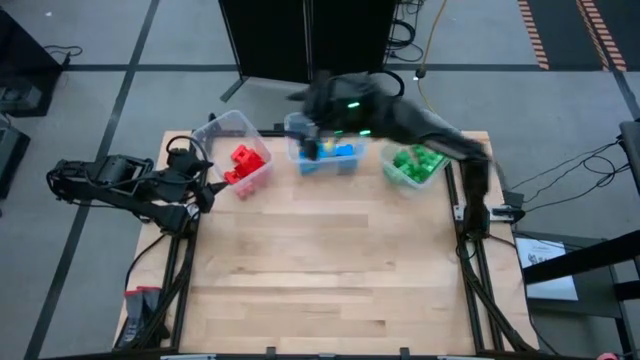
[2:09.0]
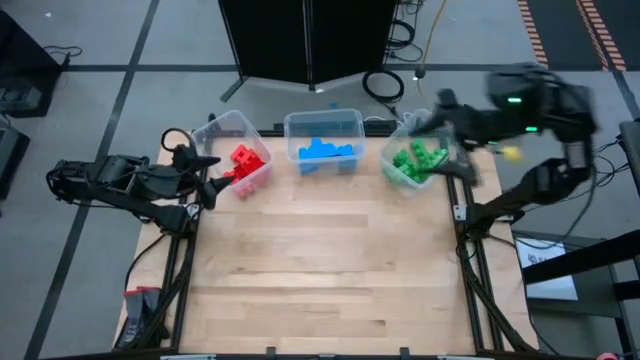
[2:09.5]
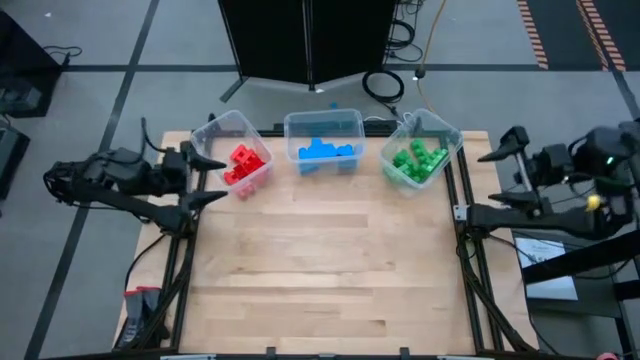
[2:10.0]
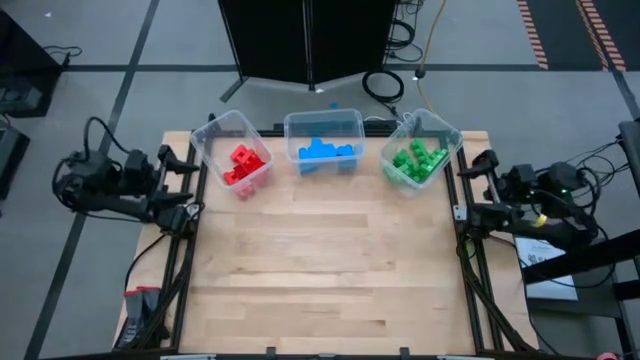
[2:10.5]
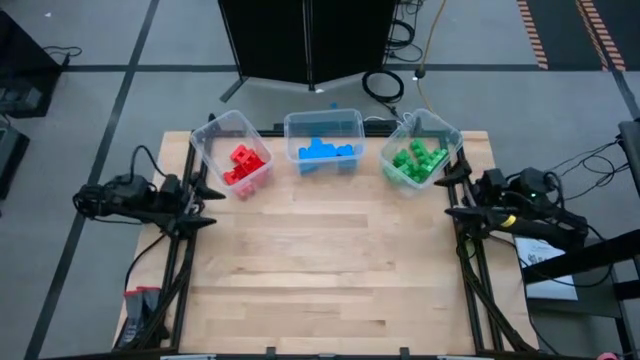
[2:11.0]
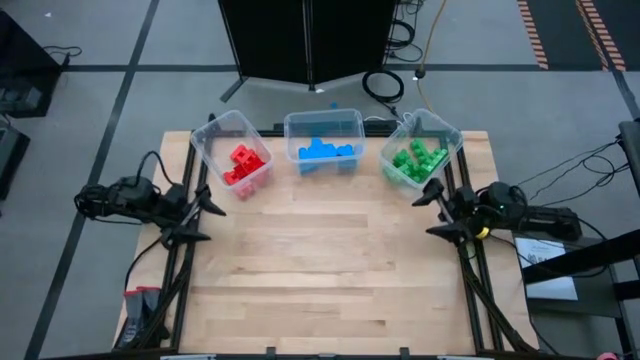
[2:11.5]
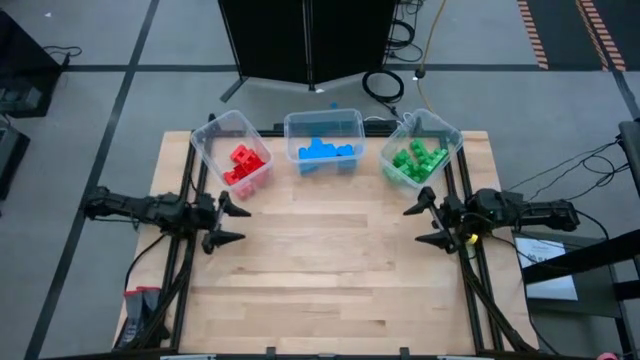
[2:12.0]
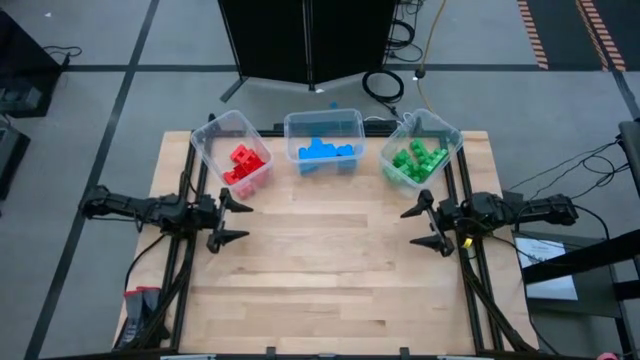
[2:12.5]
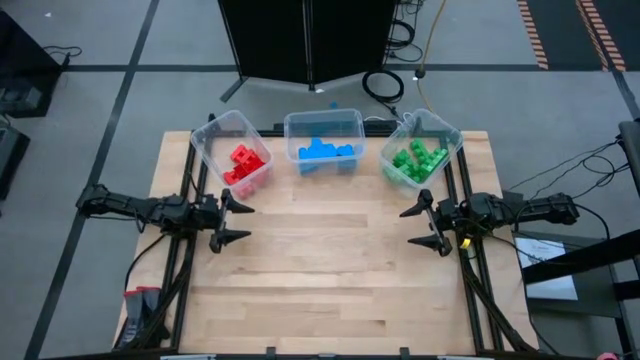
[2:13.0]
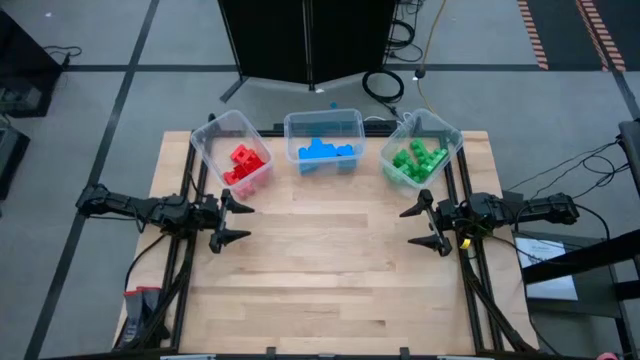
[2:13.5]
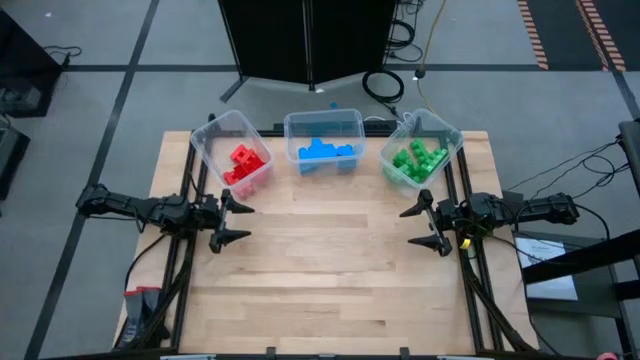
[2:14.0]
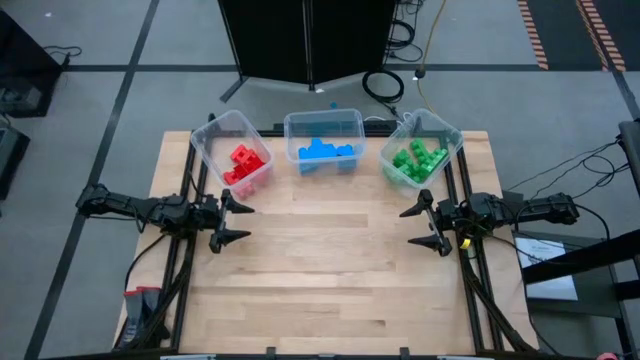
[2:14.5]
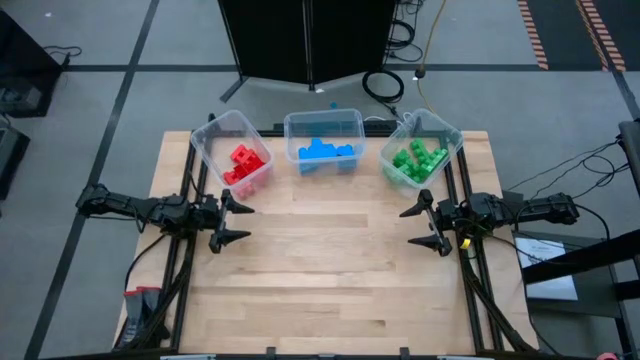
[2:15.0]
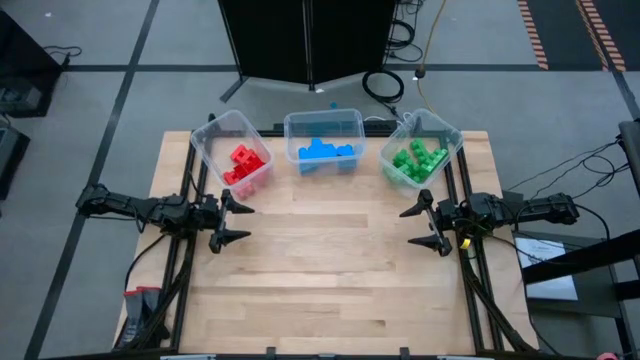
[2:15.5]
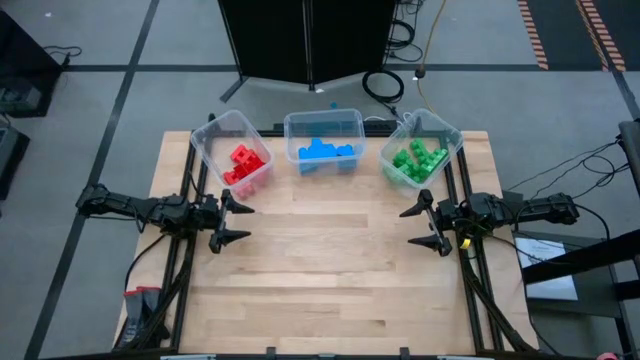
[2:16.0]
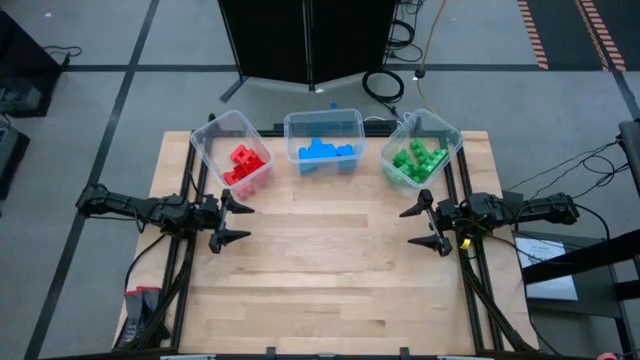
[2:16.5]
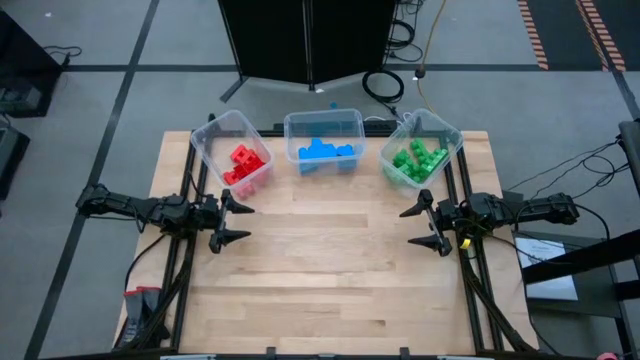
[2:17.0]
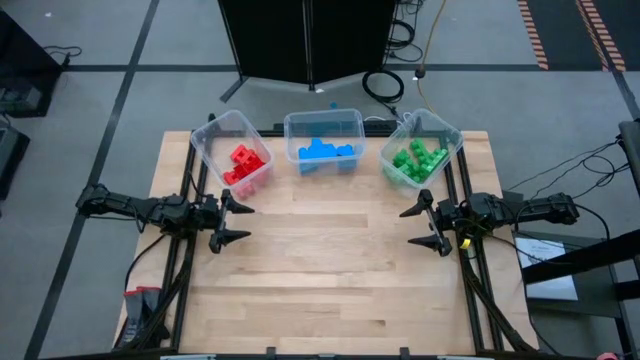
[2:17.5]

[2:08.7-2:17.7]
Task: Sort blocks
Return to Home Position

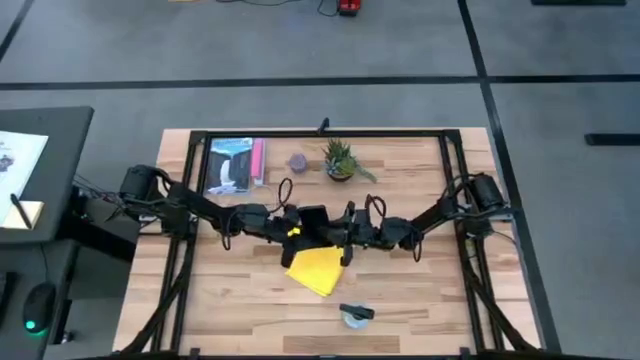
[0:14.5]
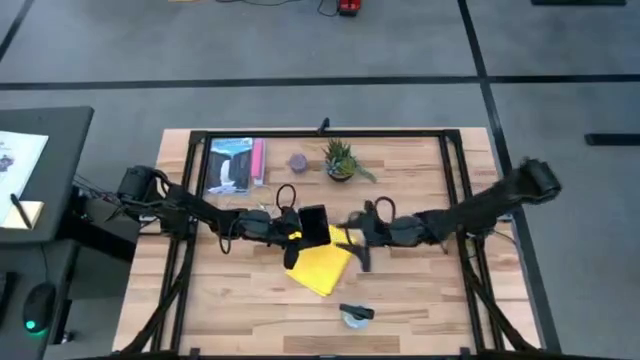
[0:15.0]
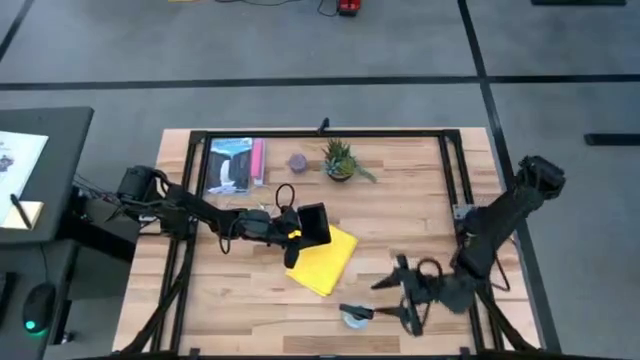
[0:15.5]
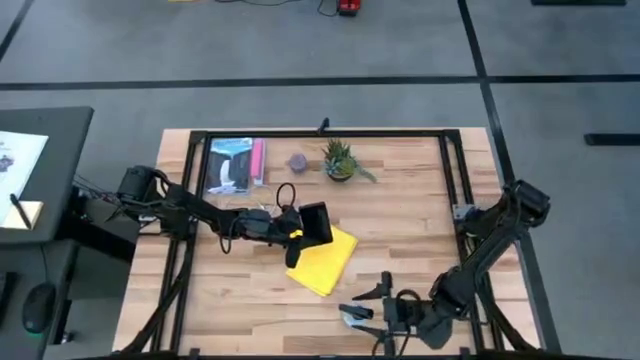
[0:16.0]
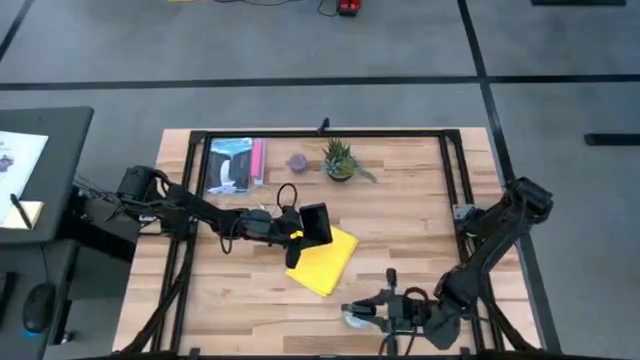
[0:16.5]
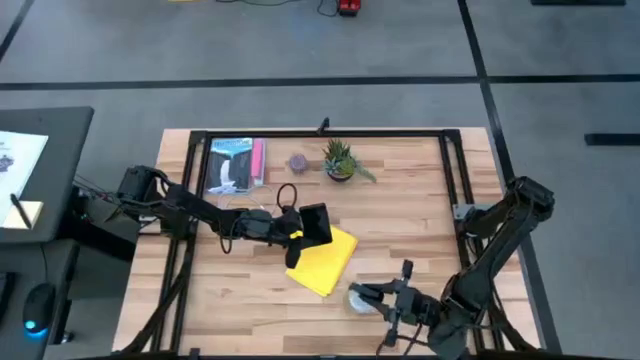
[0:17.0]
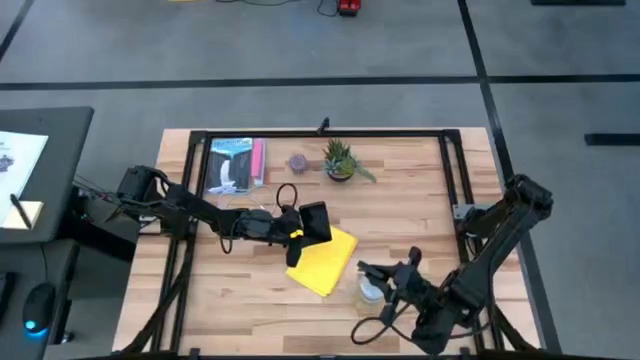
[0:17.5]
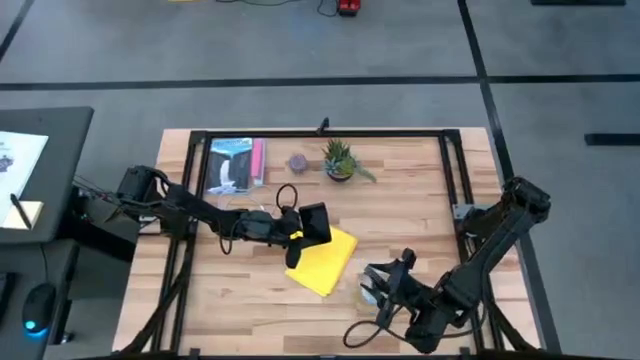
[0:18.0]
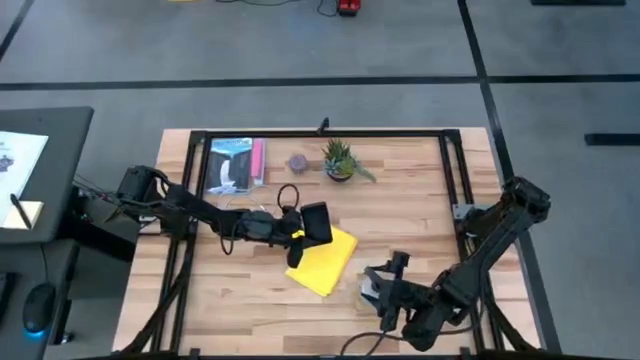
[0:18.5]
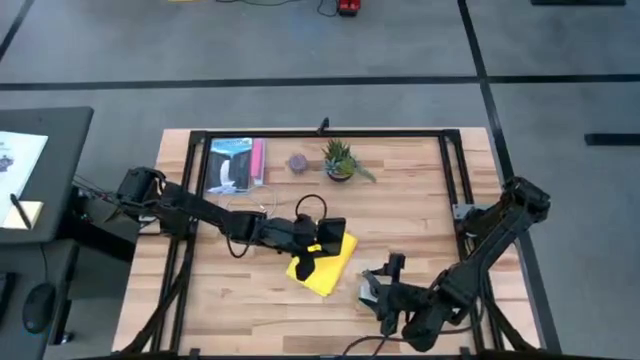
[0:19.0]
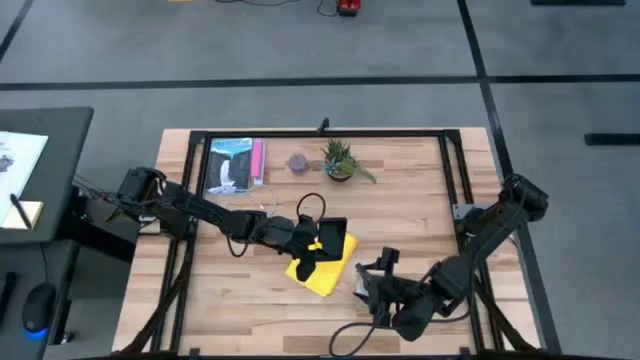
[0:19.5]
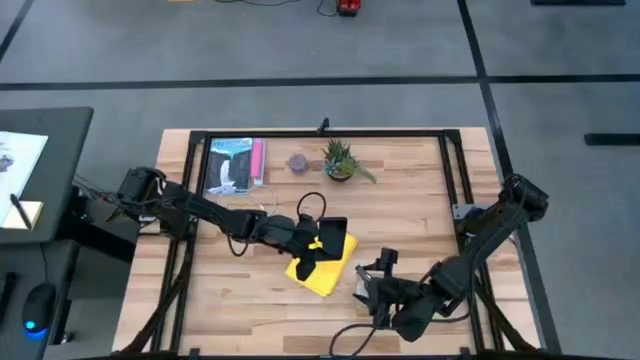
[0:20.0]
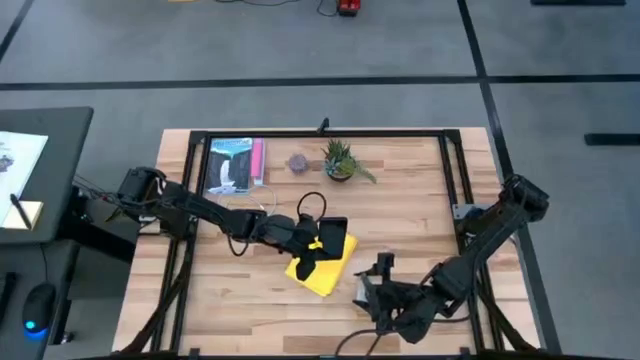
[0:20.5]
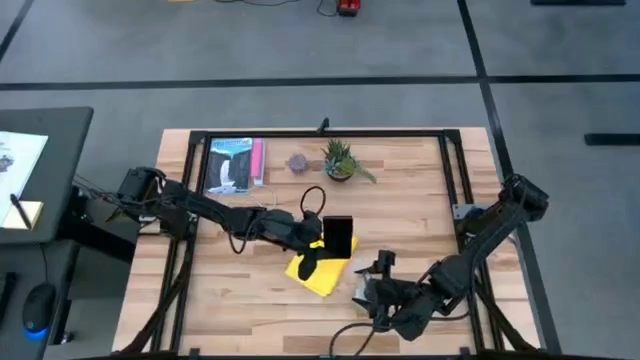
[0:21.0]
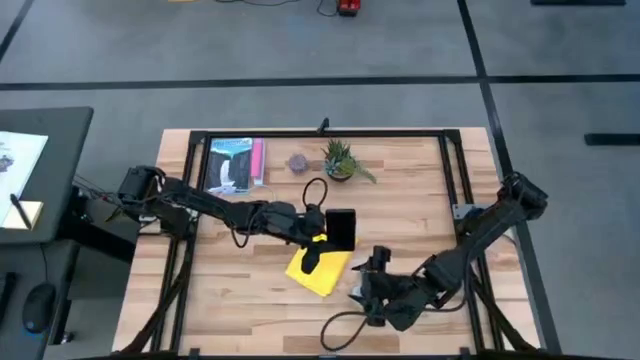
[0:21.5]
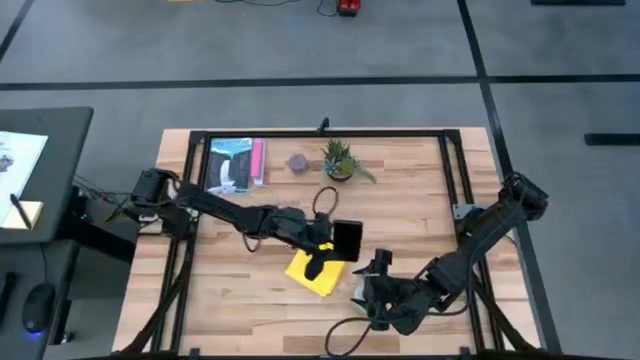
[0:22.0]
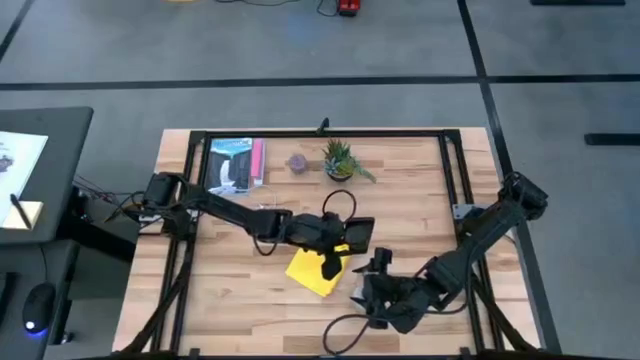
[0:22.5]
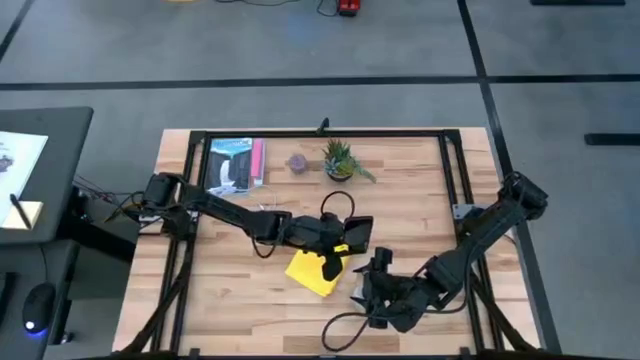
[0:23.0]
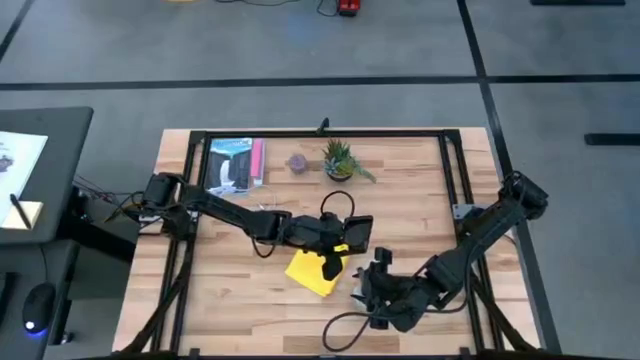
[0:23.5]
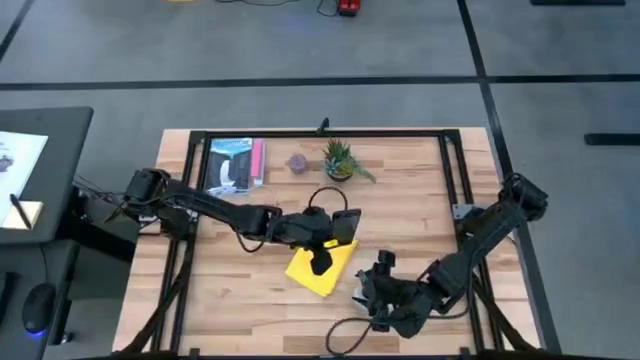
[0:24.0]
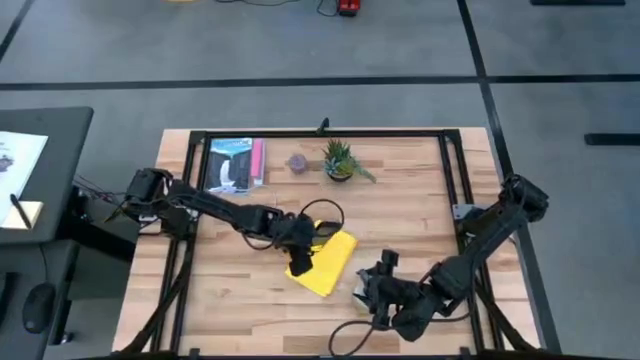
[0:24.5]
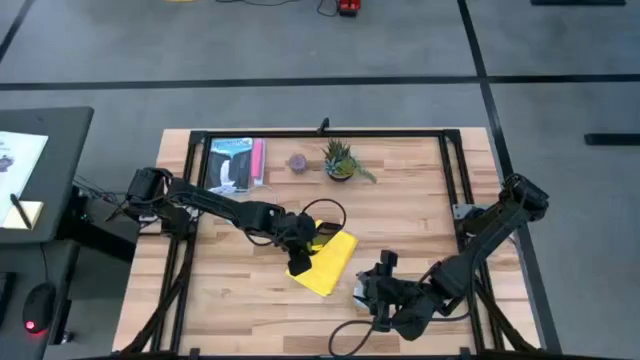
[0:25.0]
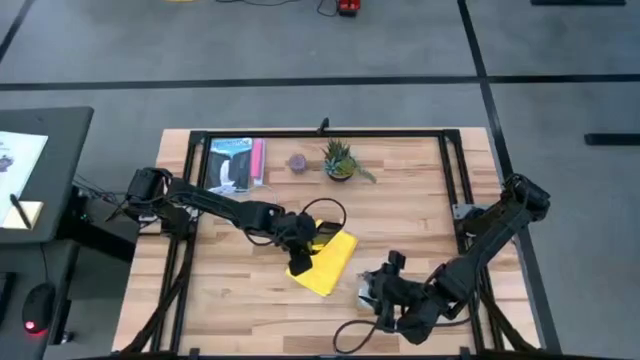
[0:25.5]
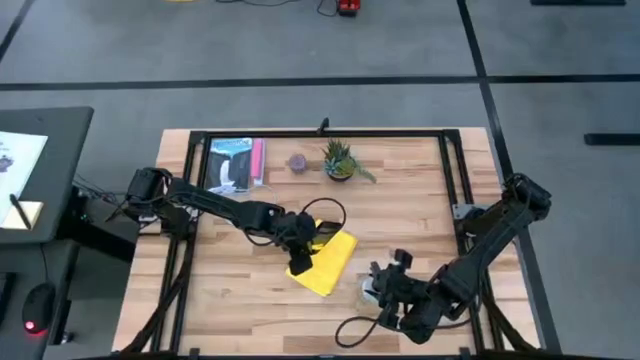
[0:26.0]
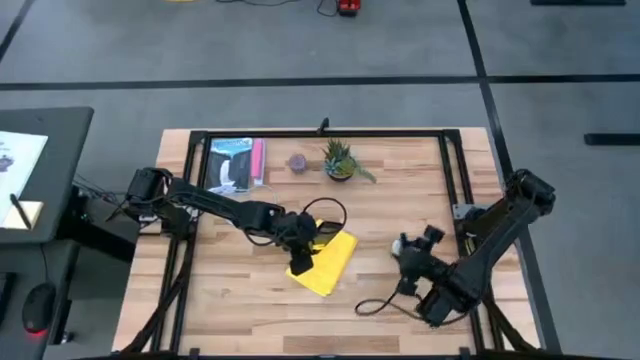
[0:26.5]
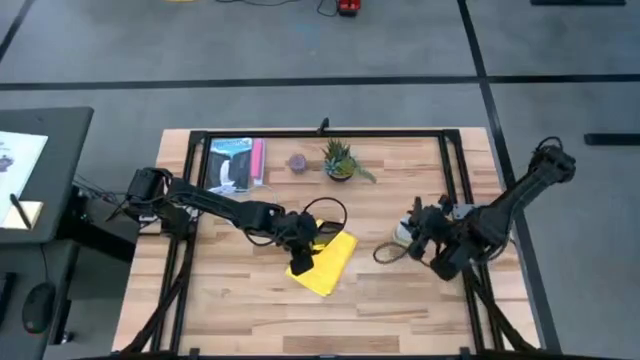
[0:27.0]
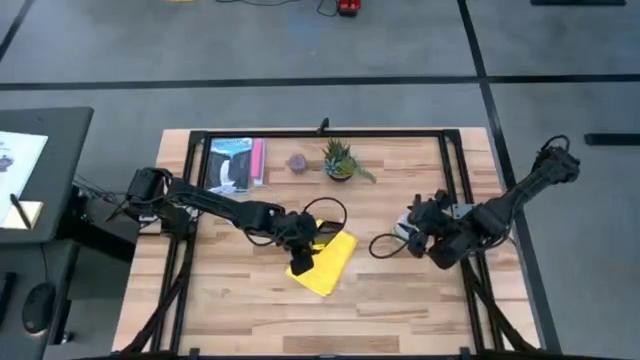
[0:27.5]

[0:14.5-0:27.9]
Task: Apply microfiber cloth
Spray the front of the cellphone
